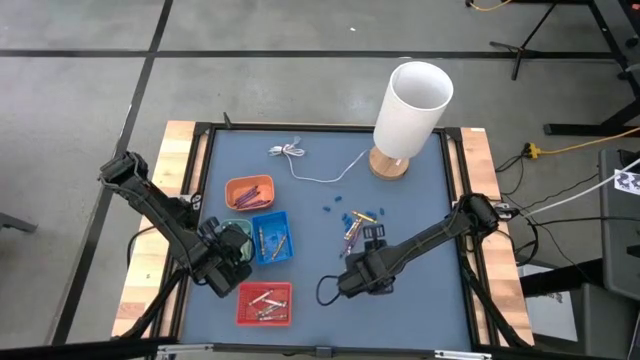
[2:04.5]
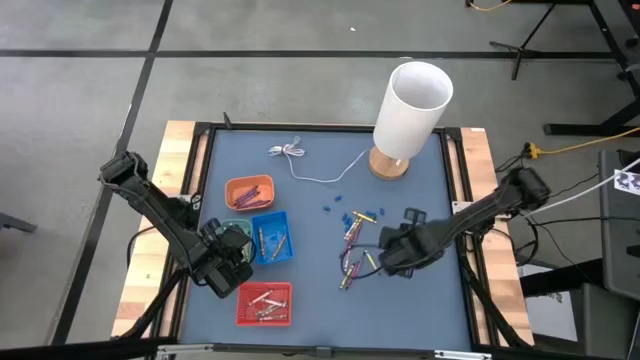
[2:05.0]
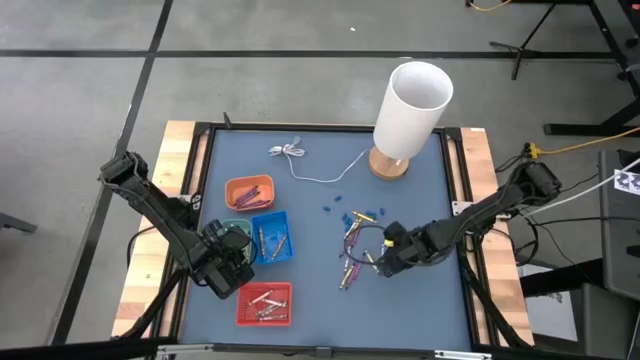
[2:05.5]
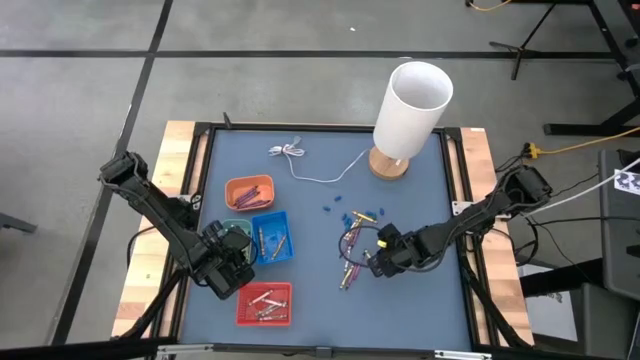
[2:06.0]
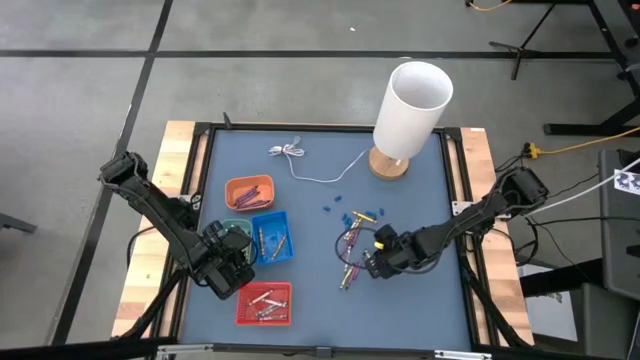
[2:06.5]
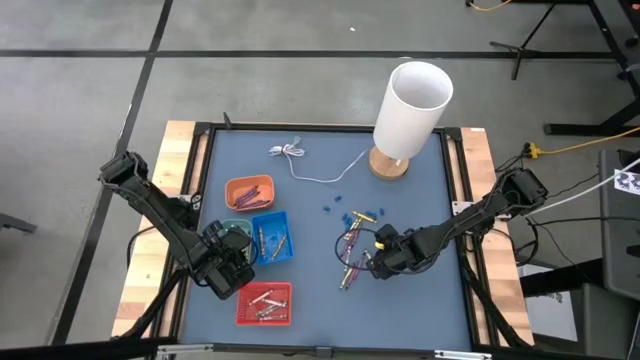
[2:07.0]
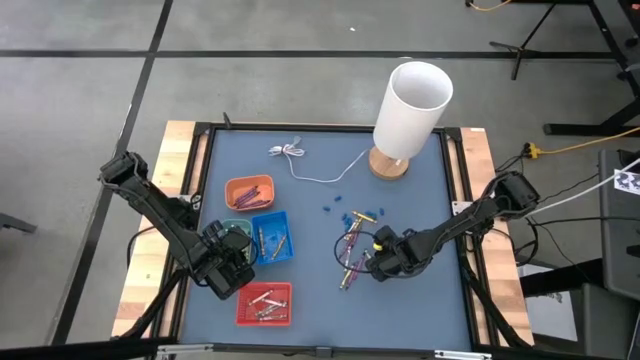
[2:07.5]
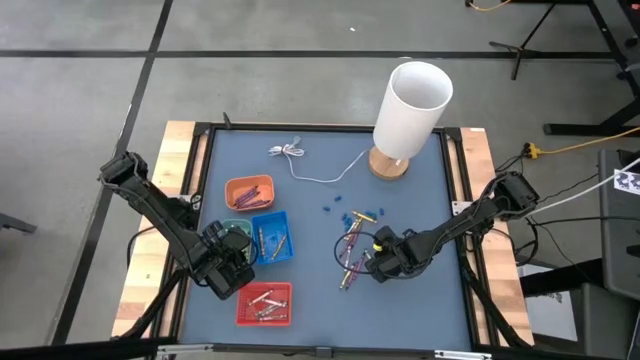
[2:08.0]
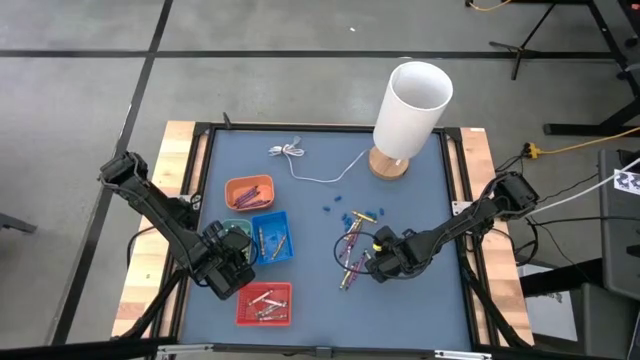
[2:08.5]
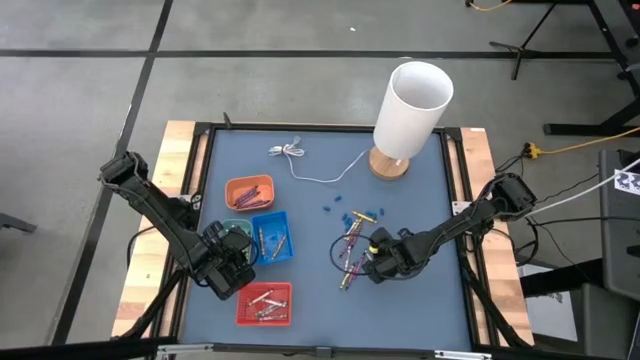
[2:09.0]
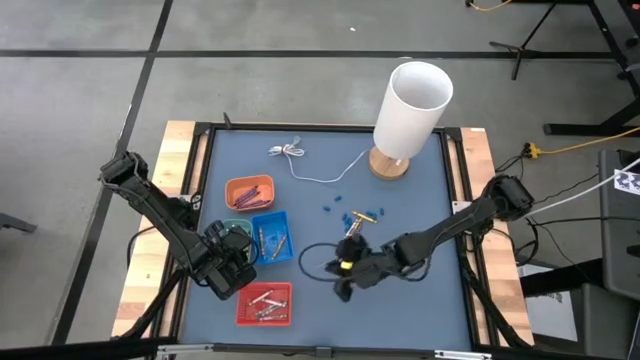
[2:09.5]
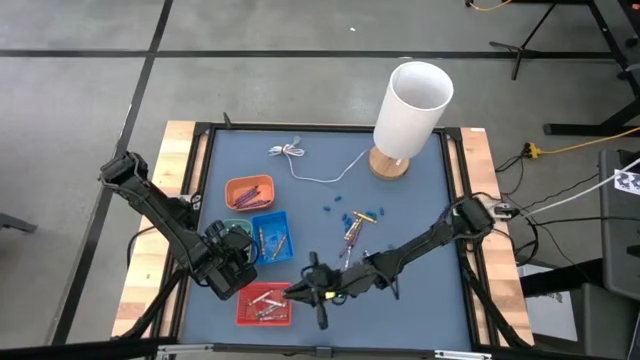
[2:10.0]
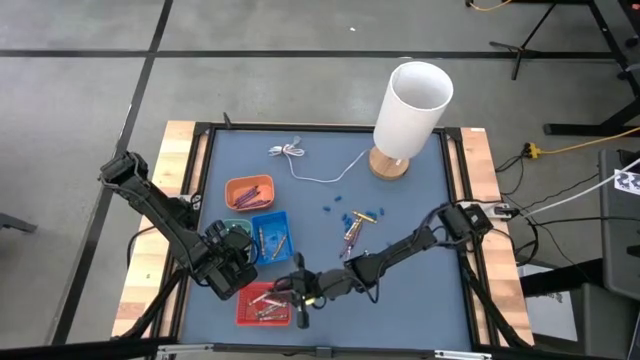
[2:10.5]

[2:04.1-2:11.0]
Task: Sort crayons
Put the gray crayon into the orange basket

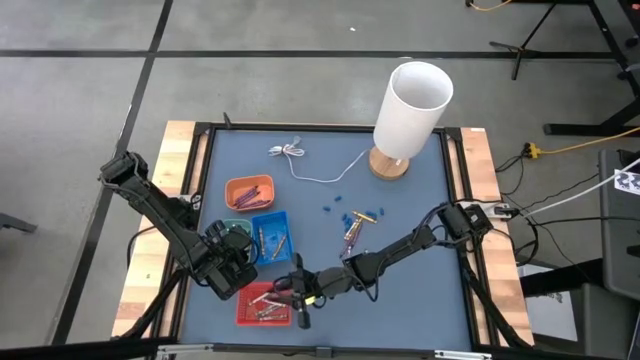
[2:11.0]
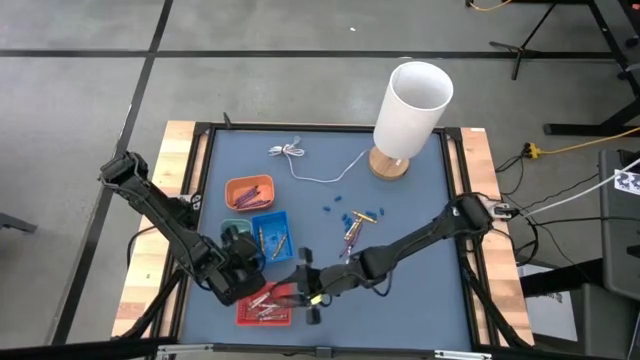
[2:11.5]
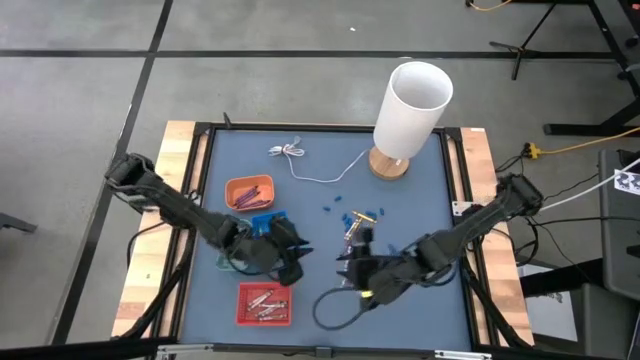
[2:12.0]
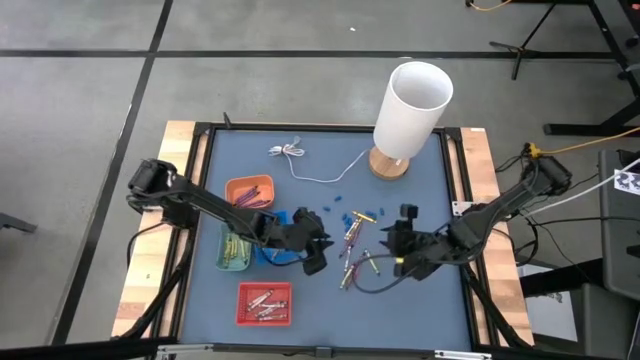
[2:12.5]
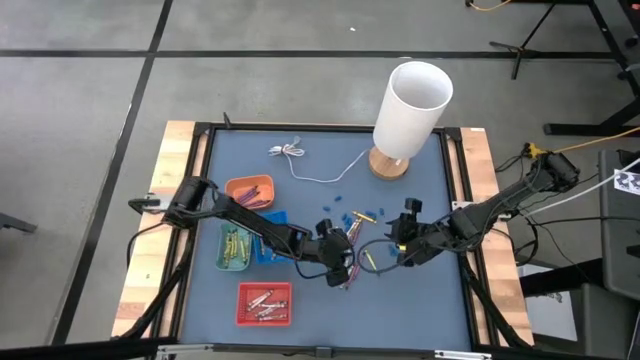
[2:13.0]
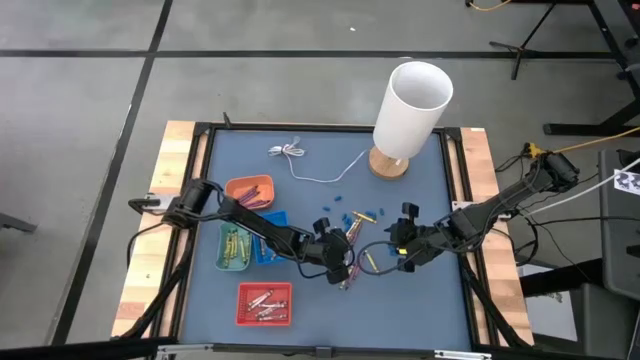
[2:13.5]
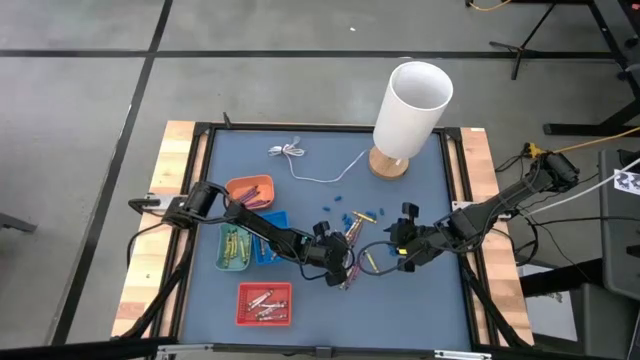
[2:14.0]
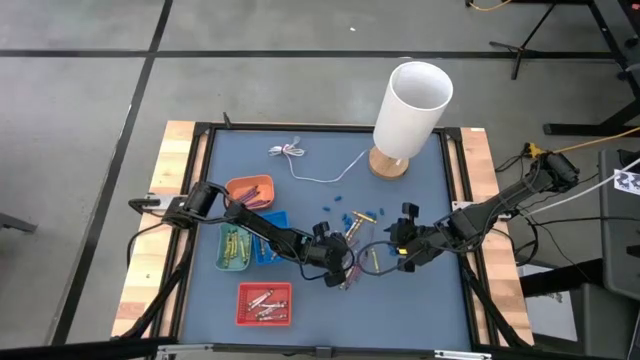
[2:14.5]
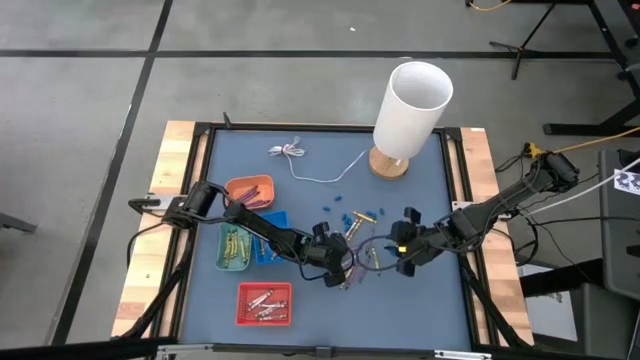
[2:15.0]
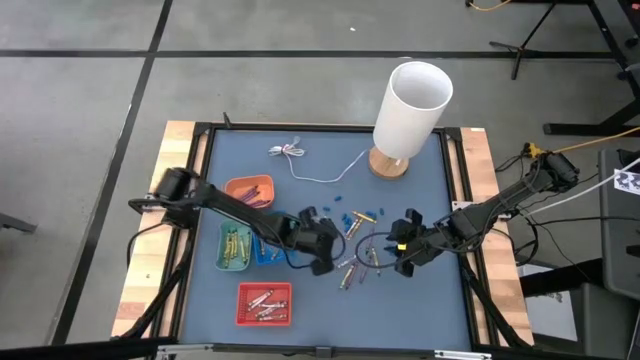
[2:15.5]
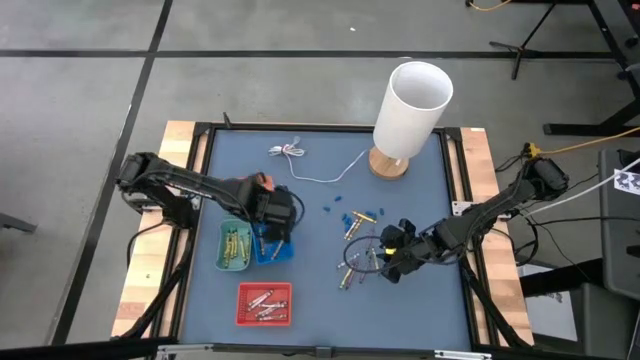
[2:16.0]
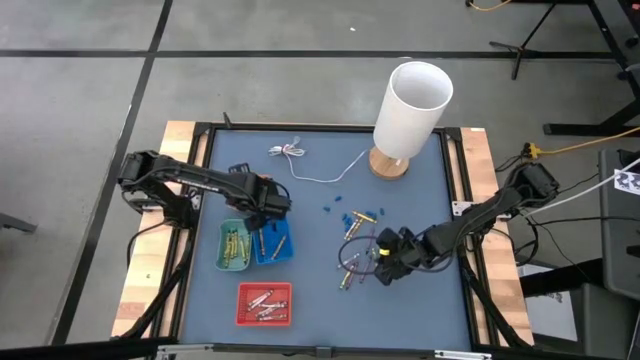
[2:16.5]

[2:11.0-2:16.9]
Put the violet crayon into the orange bin

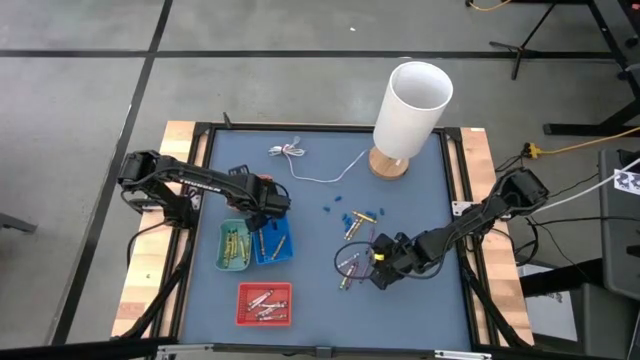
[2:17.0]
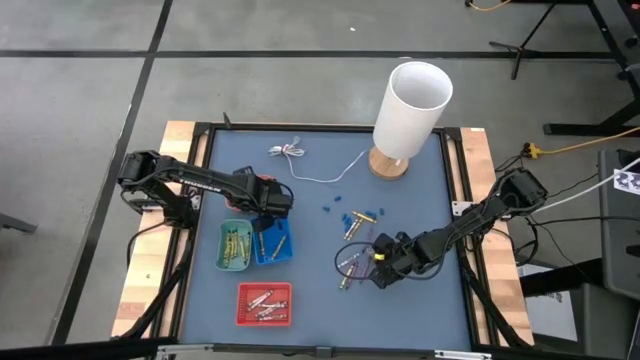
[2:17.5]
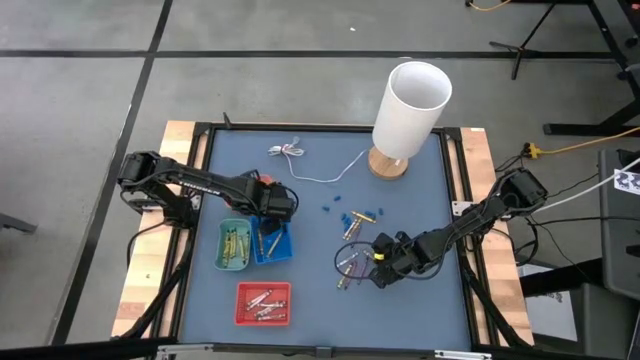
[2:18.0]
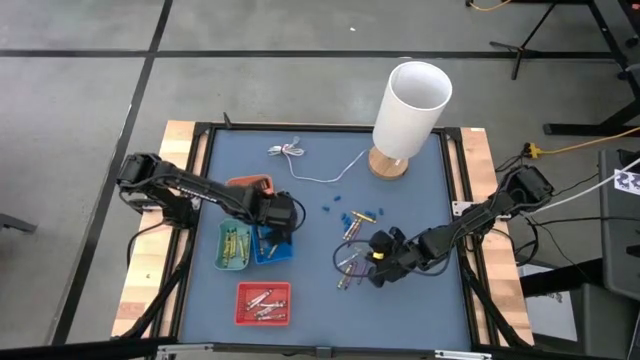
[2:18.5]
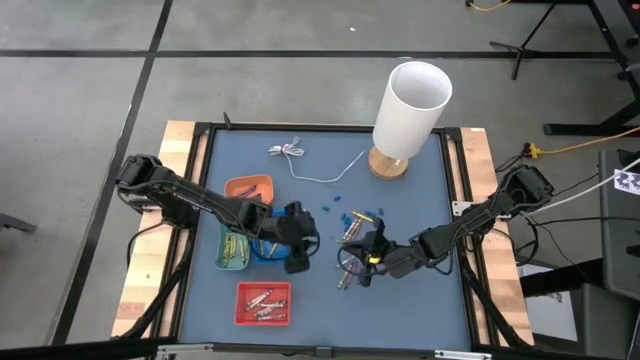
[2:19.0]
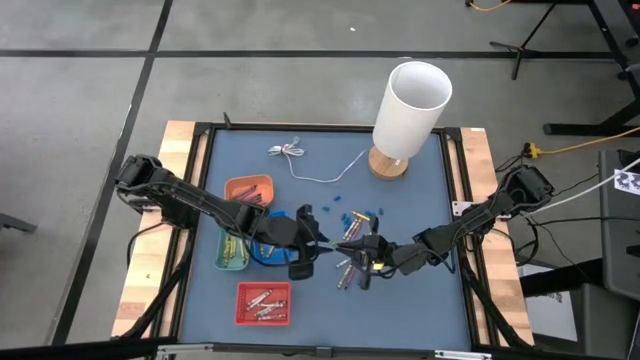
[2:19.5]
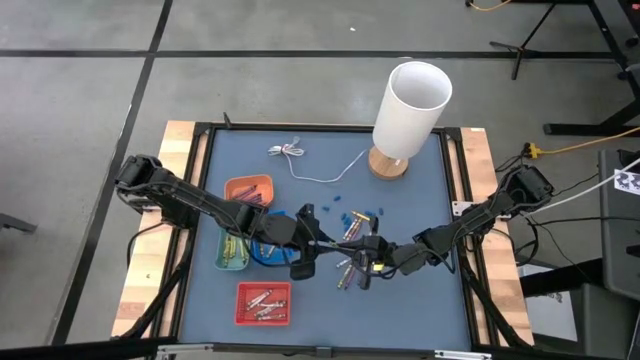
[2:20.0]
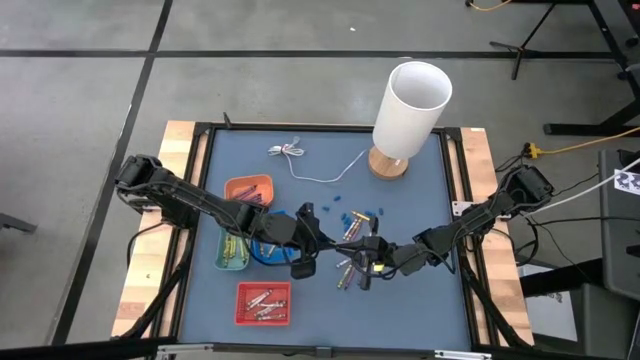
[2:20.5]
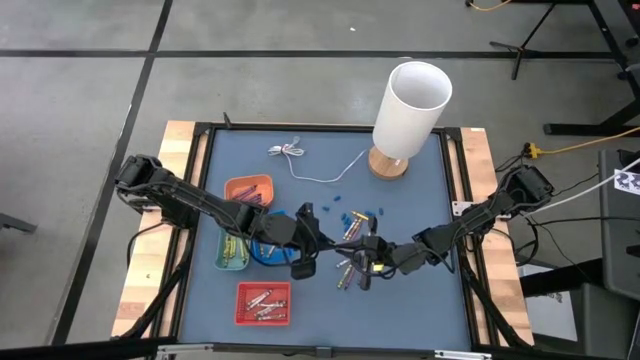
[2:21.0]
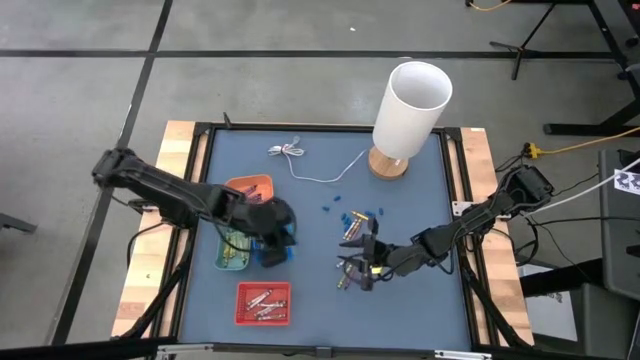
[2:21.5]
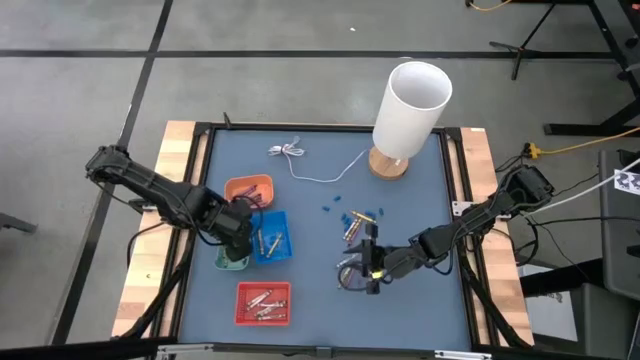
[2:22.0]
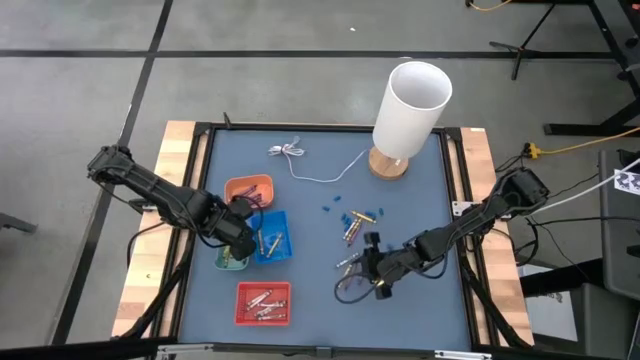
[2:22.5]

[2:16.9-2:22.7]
Put the green crayon into the blue green bin

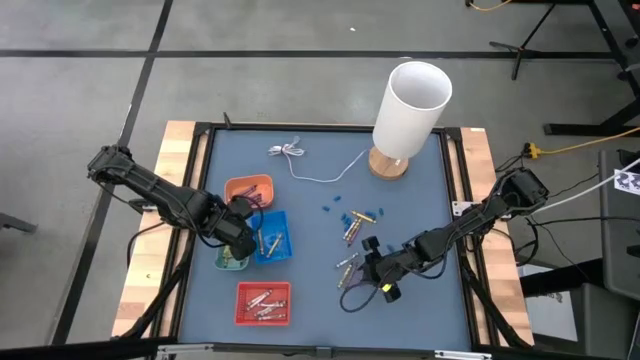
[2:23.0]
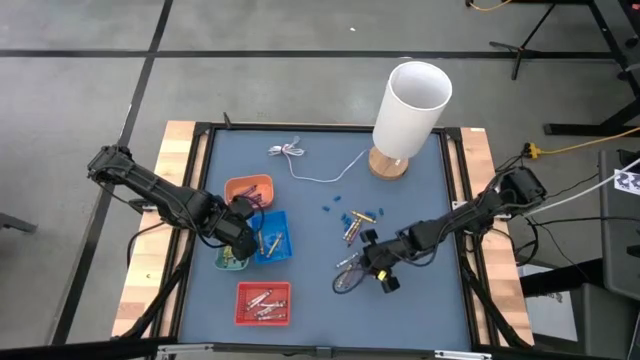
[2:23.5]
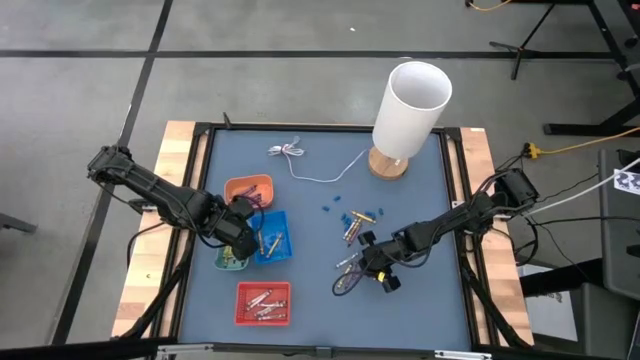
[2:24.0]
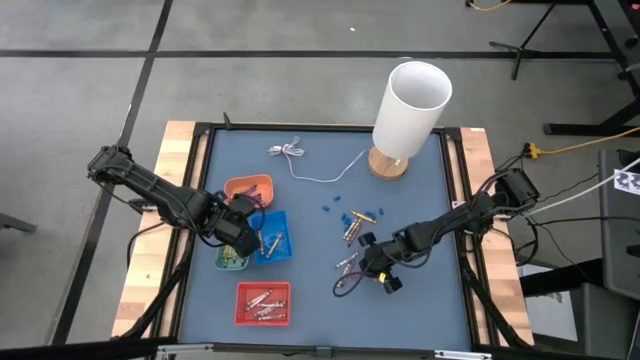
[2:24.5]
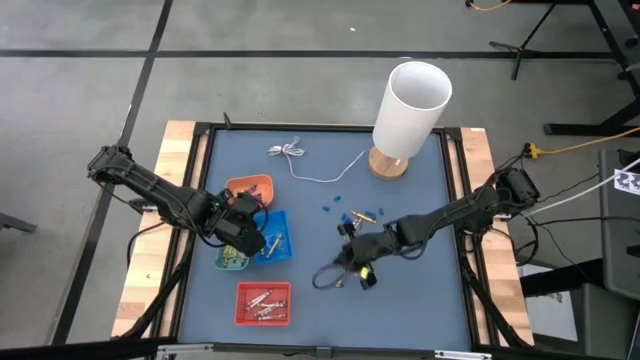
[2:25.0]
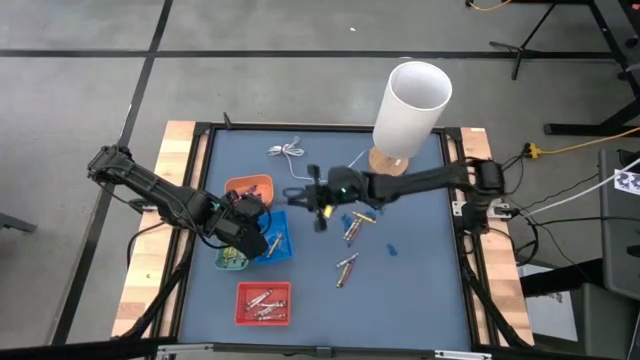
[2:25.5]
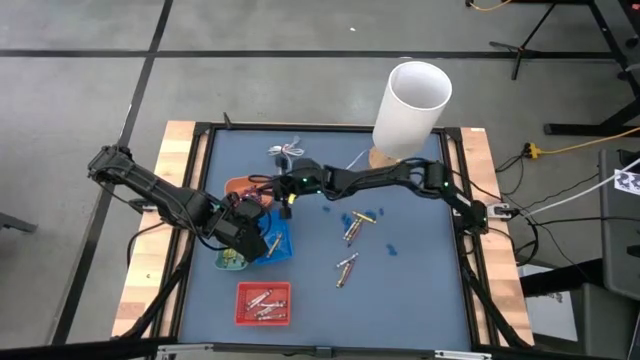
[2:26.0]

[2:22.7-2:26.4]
Put the violet crayon into the orange bin
